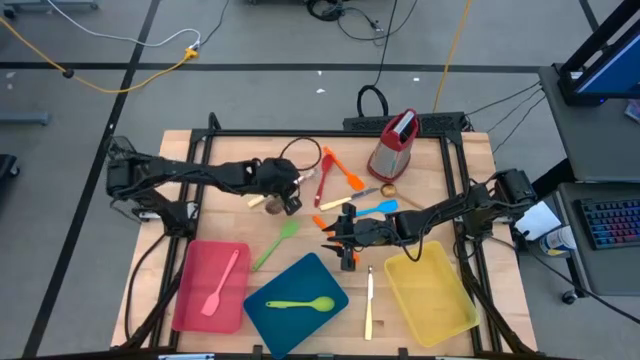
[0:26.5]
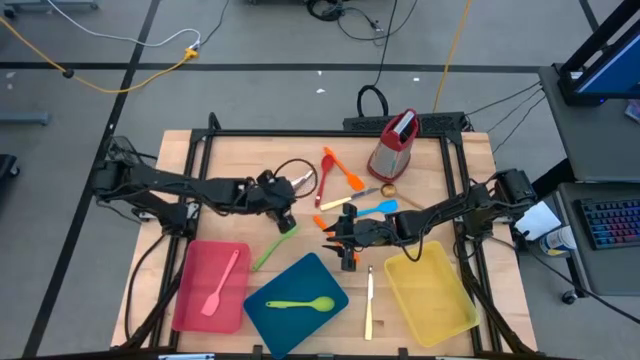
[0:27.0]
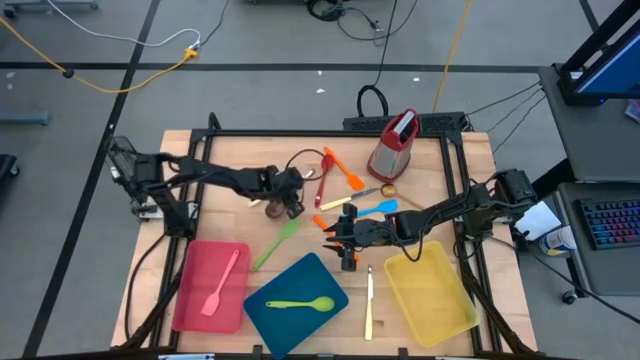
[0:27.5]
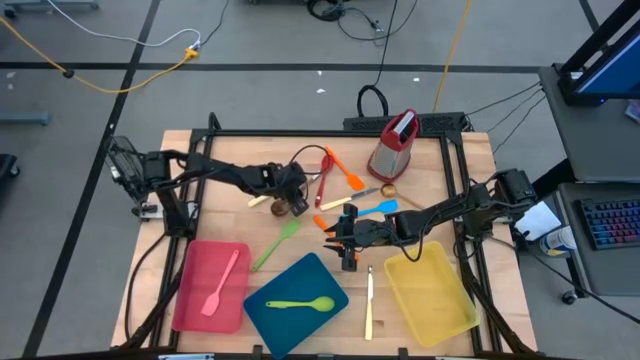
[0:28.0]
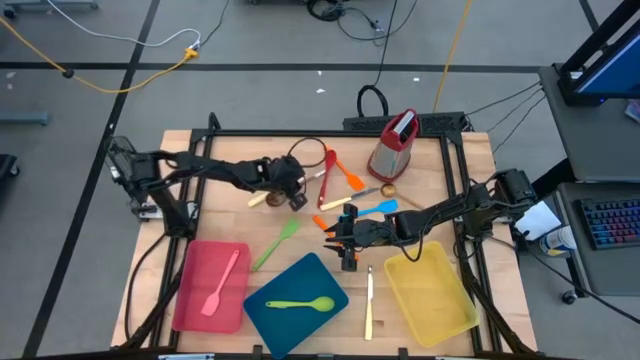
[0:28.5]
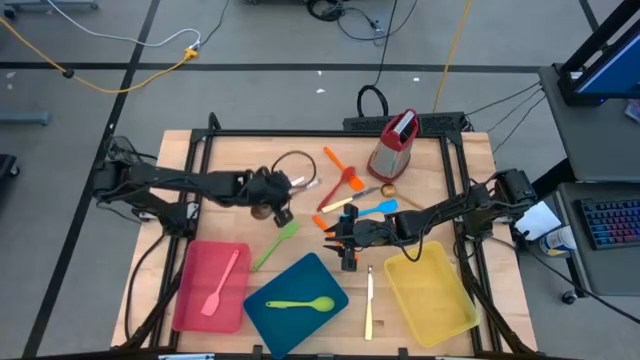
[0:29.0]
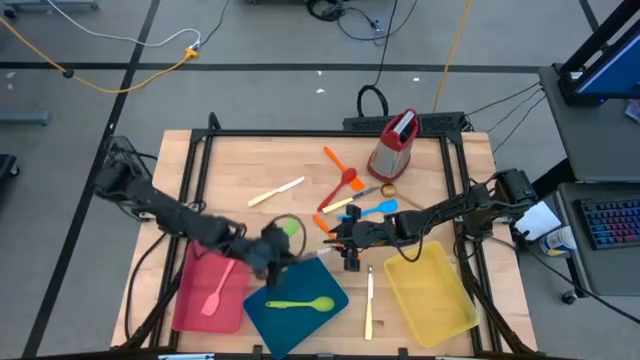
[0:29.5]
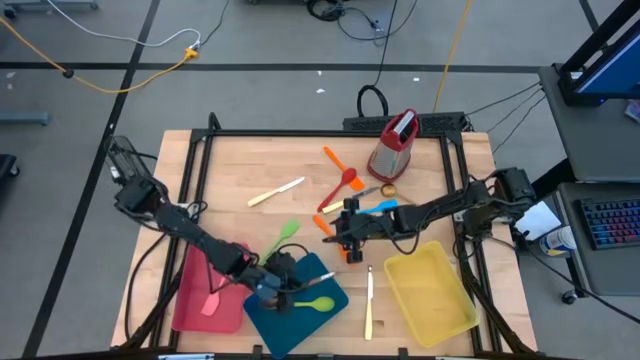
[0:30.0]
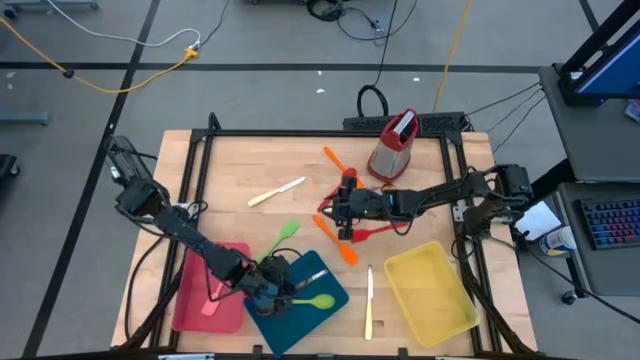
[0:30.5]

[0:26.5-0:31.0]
Task: Pick & Place Kitchen Items
Put the brown serving spoon into the blue bin

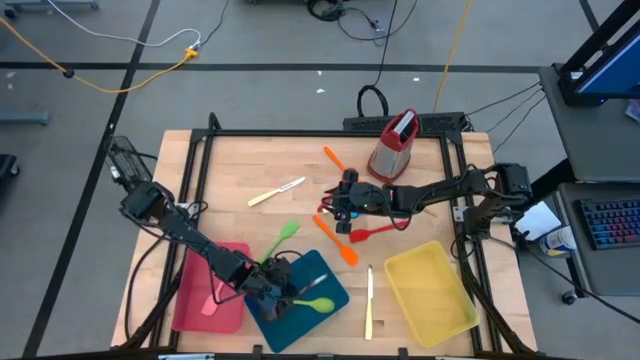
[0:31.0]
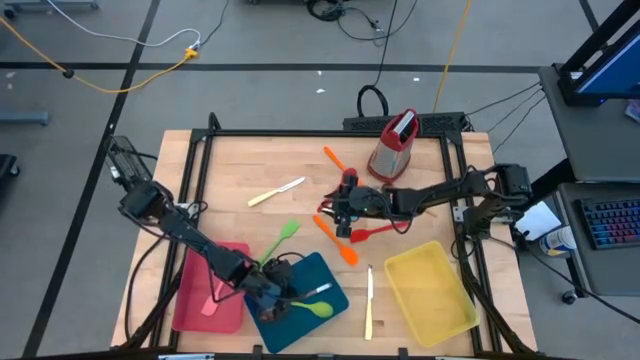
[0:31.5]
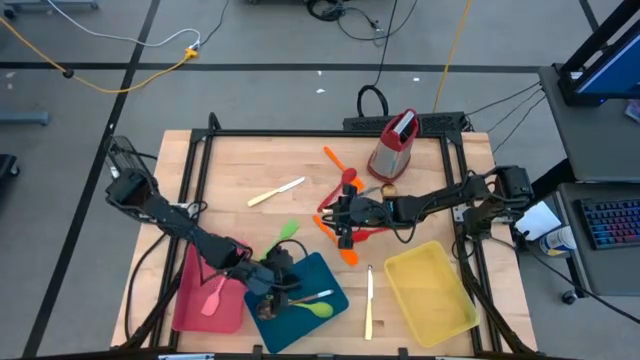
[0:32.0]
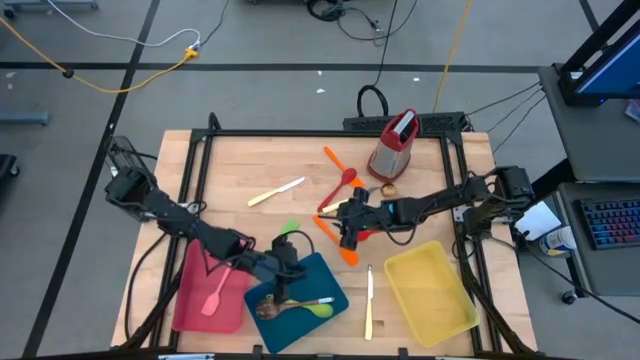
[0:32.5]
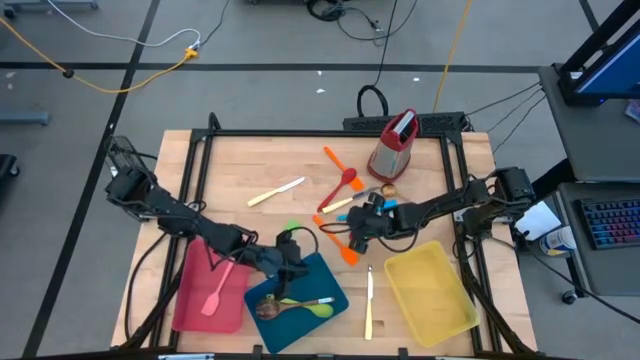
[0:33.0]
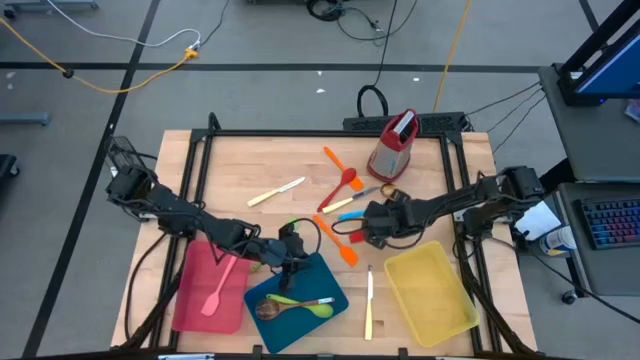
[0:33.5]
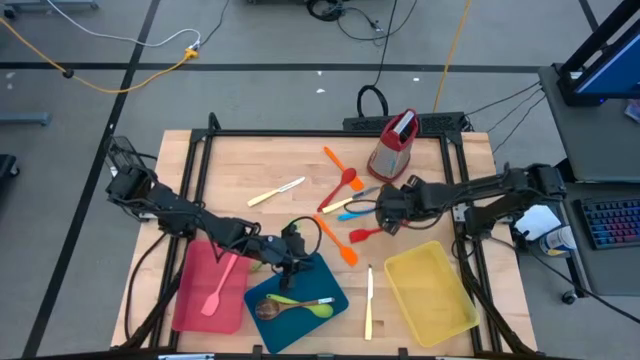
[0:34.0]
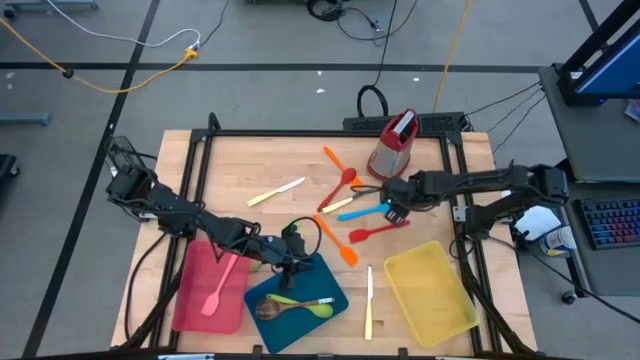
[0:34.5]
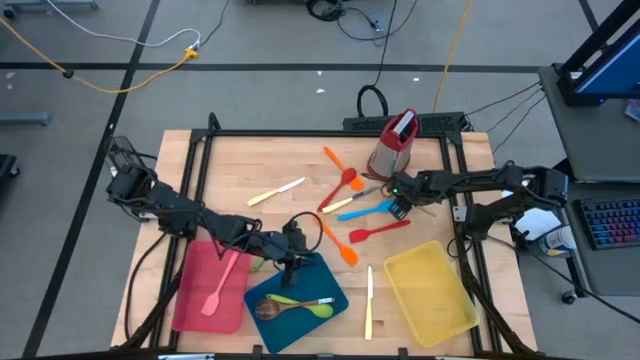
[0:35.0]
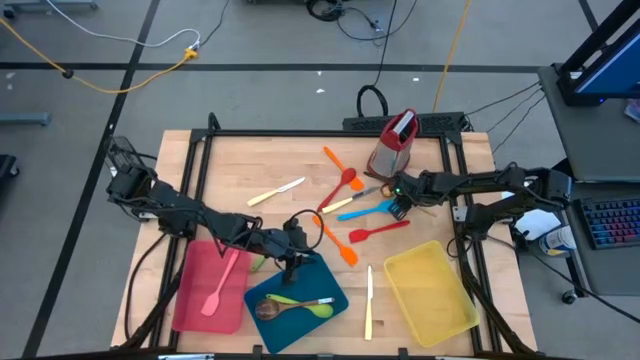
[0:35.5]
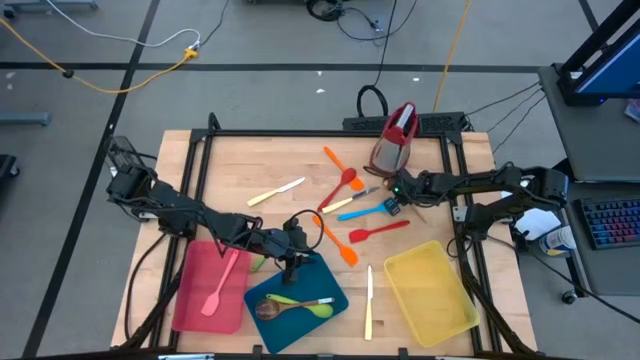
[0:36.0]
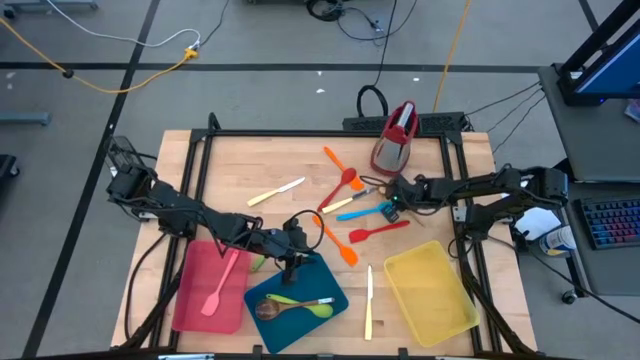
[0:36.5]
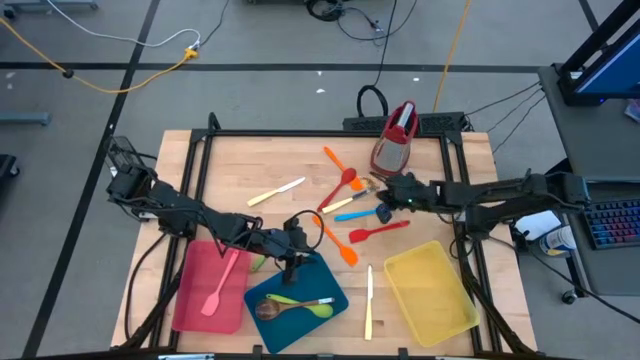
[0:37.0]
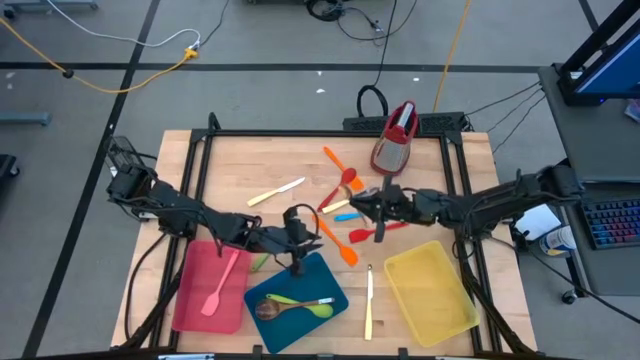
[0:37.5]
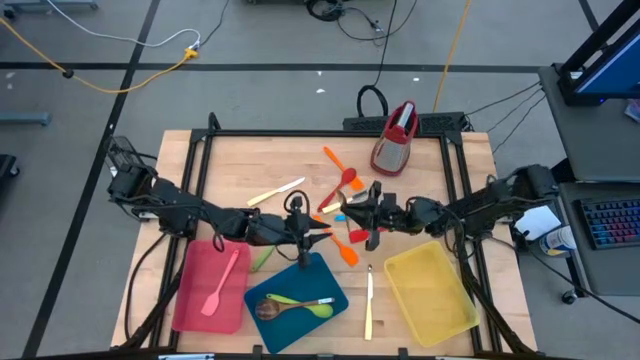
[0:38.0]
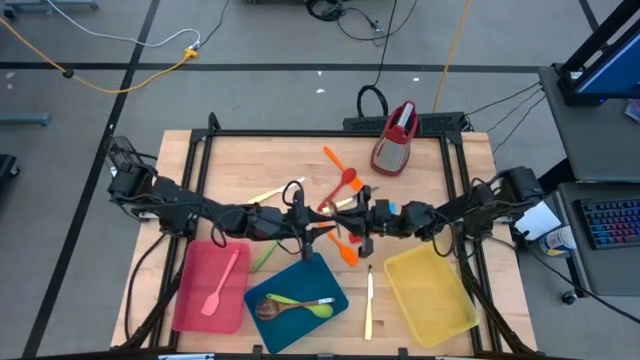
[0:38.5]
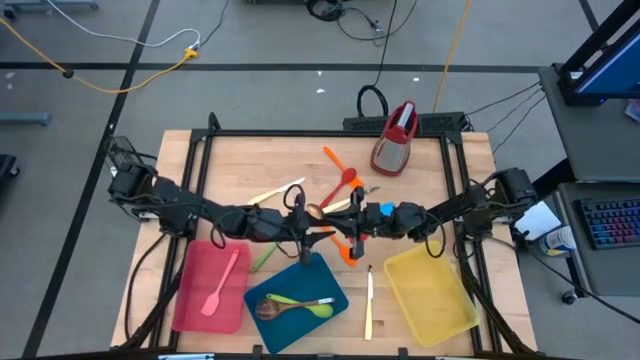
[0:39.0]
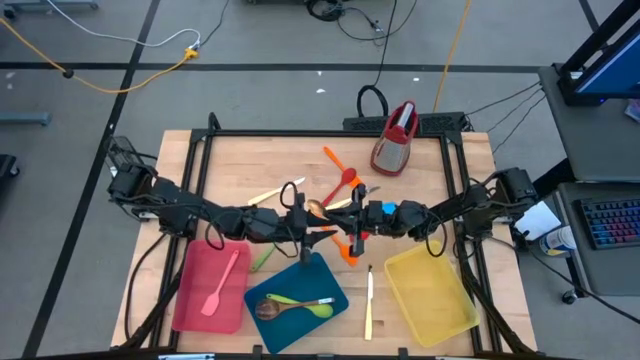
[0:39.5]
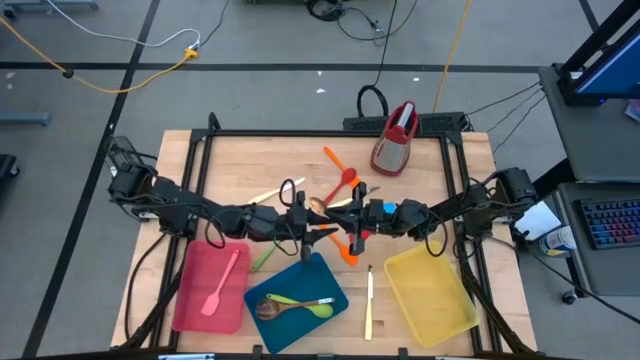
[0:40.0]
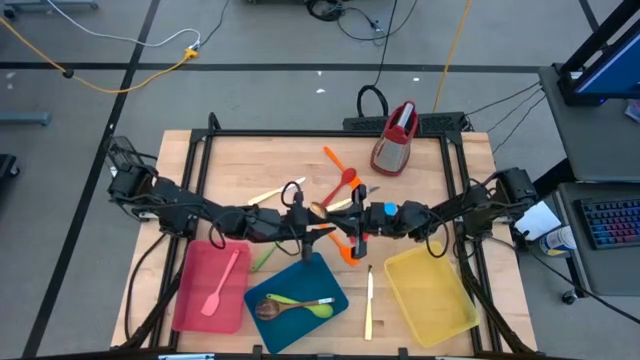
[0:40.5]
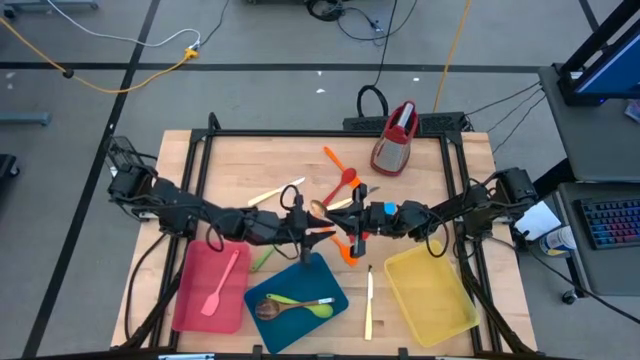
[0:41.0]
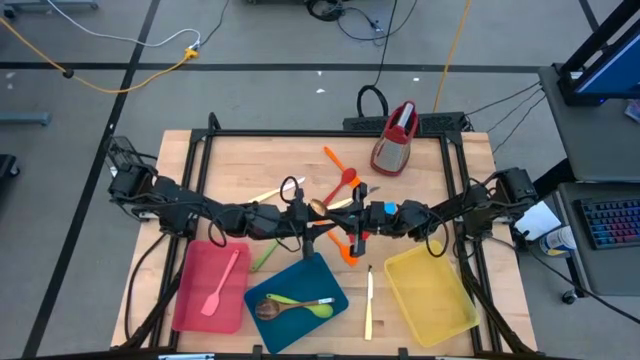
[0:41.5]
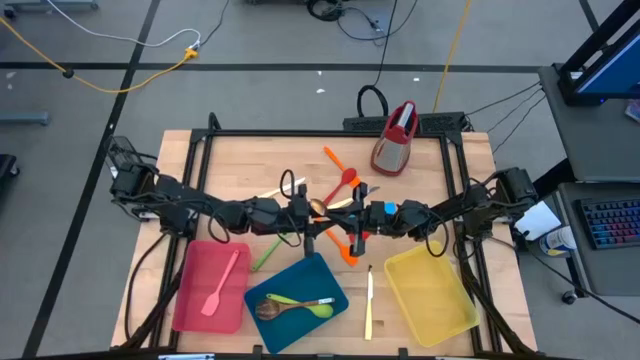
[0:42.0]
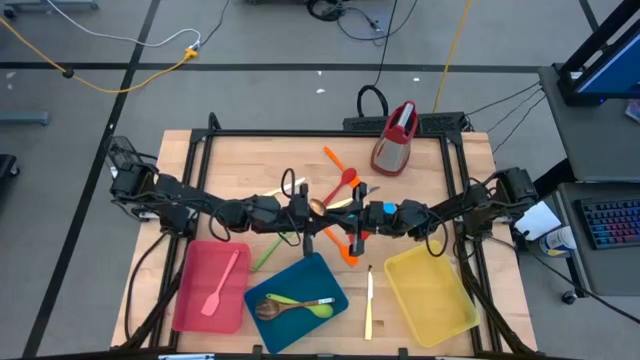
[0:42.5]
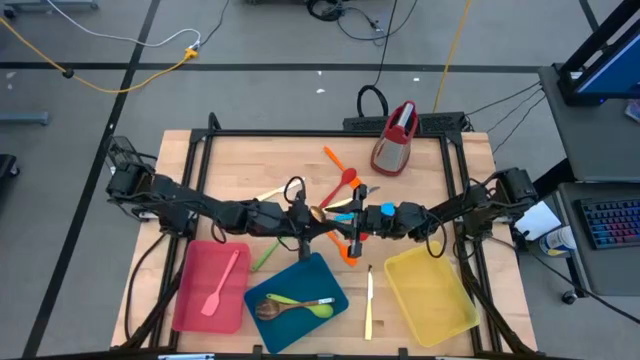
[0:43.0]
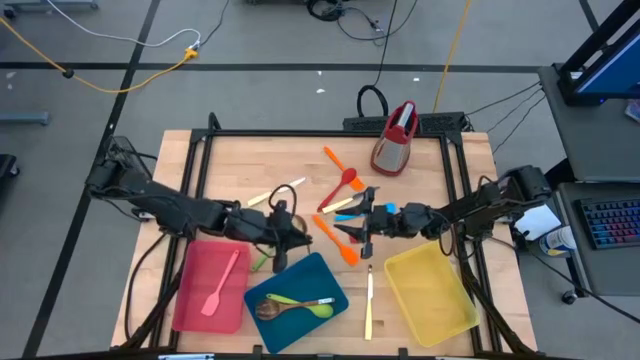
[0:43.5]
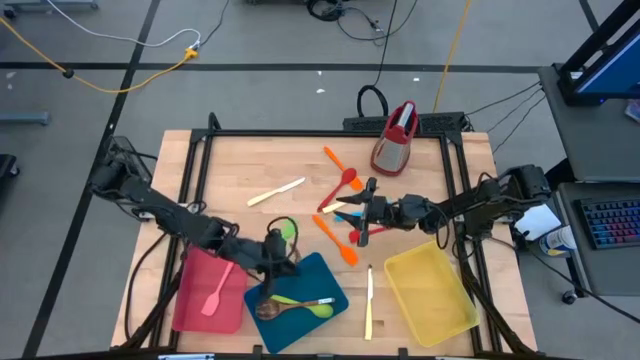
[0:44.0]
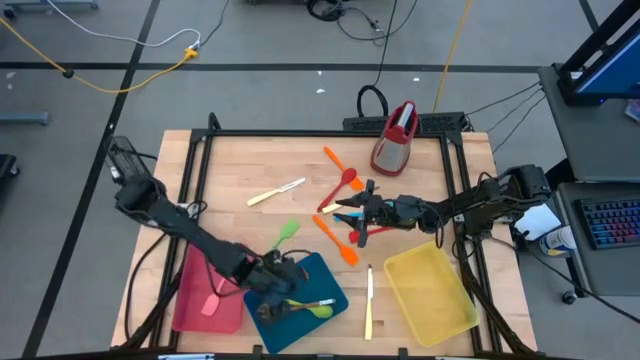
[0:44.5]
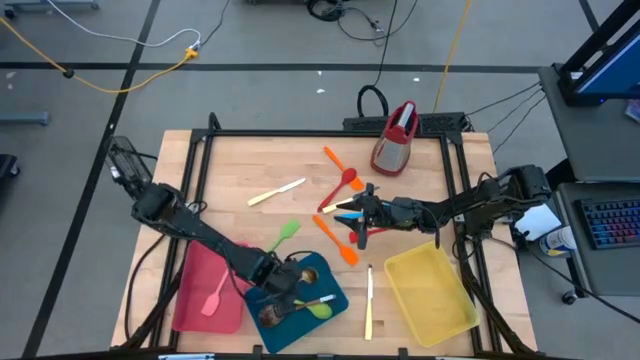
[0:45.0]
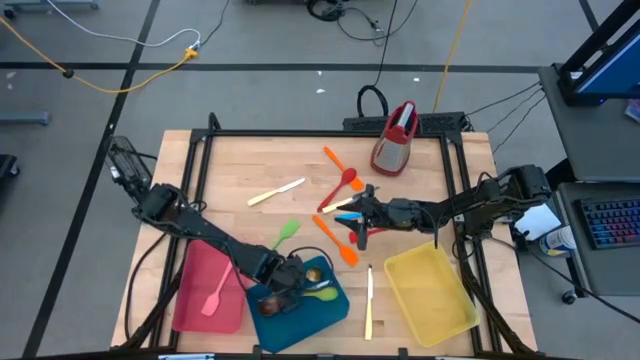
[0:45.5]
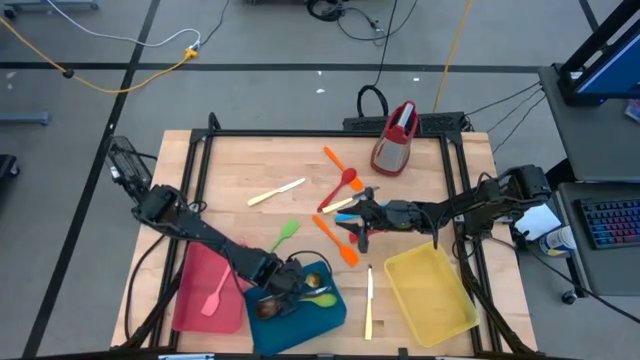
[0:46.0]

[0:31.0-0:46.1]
Put the gold serving spoon into the blue bin

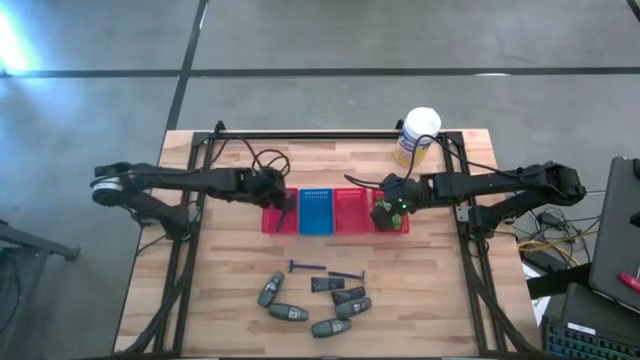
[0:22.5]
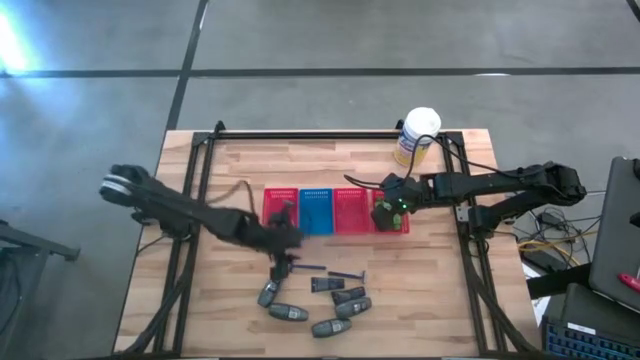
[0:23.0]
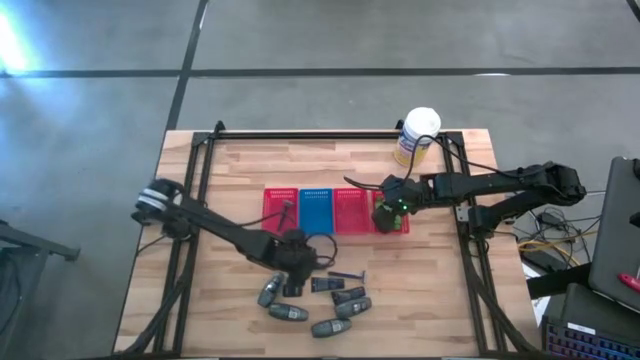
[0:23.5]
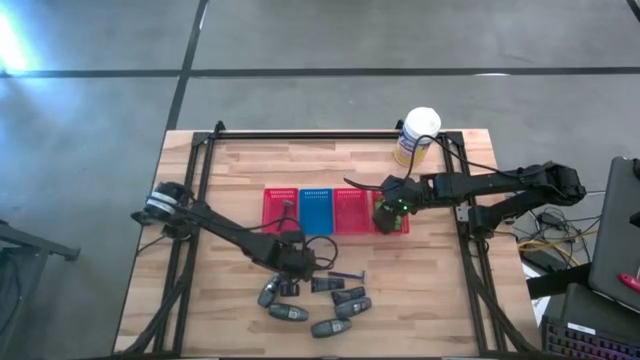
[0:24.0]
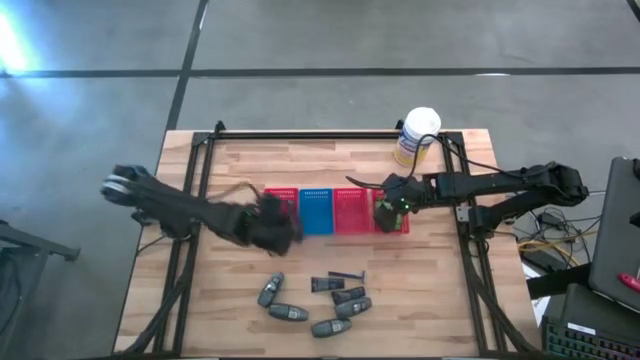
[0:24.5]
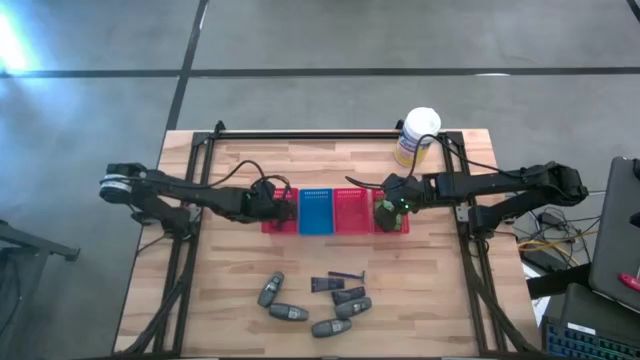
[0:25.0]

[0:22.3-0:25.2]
Task: Pick & Place Travel size toiletries
Put the blue razor into the left red bin
